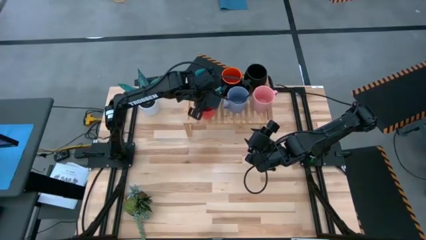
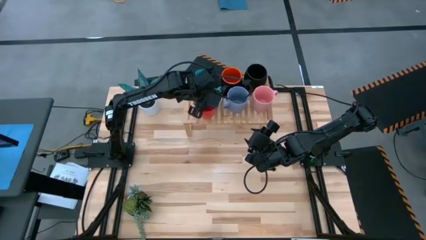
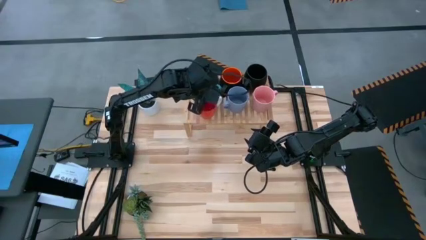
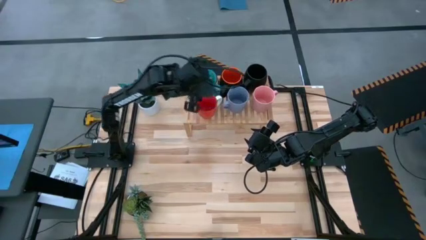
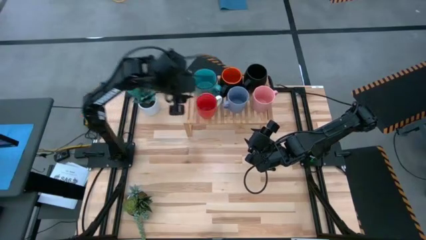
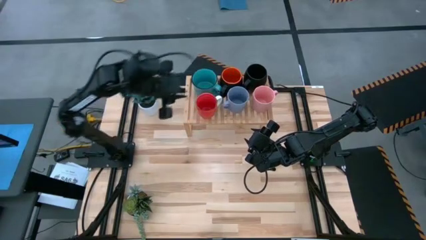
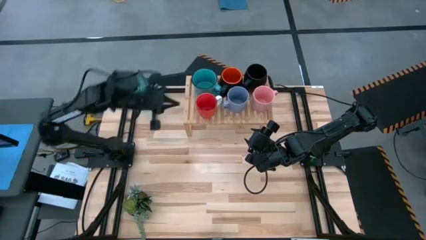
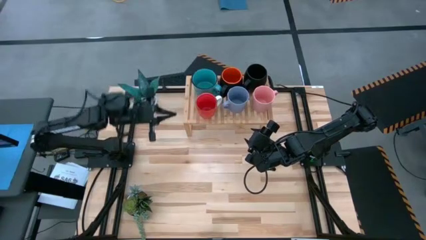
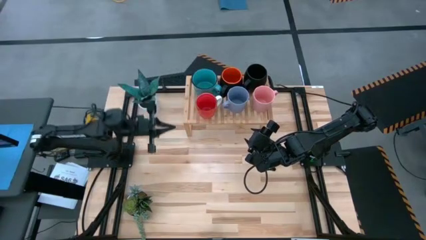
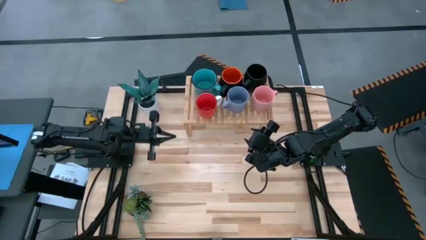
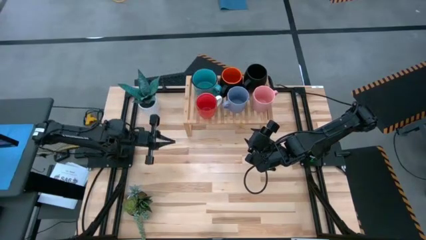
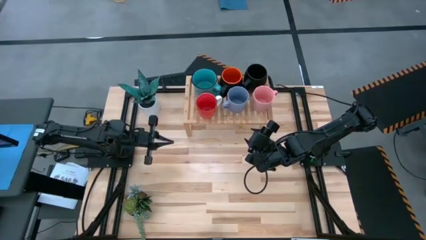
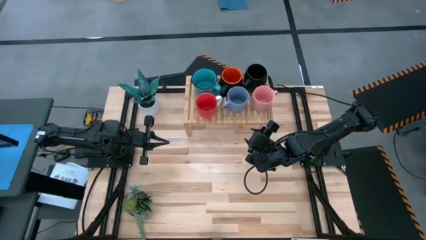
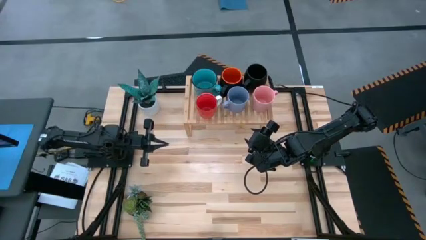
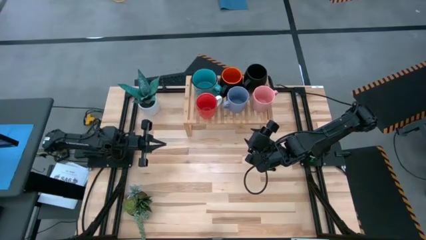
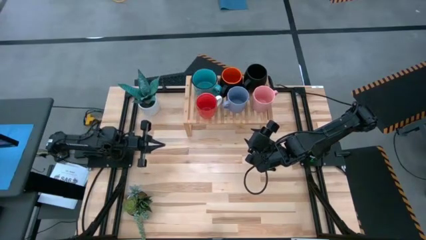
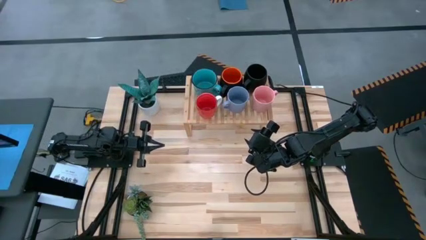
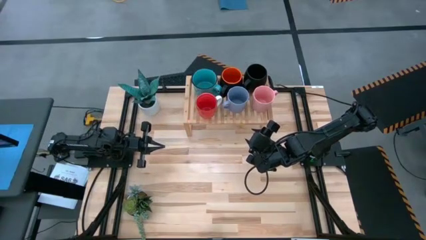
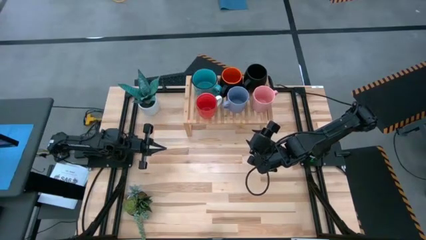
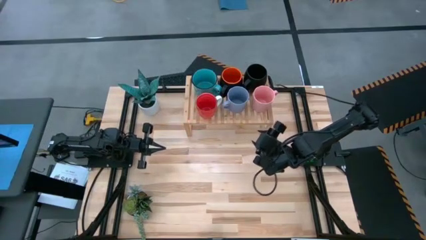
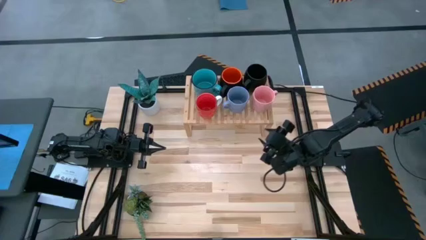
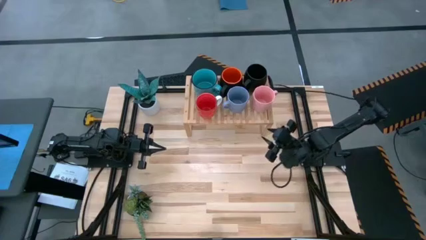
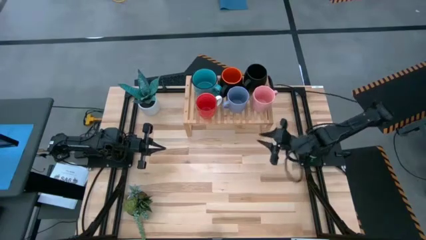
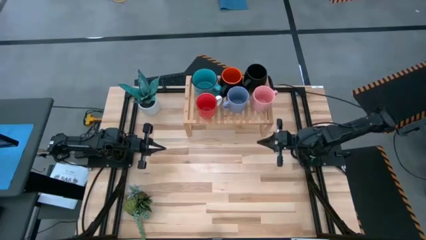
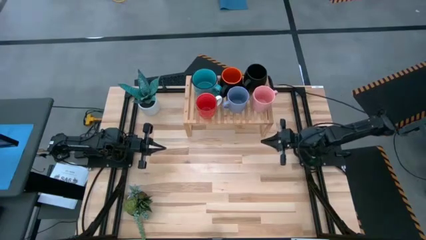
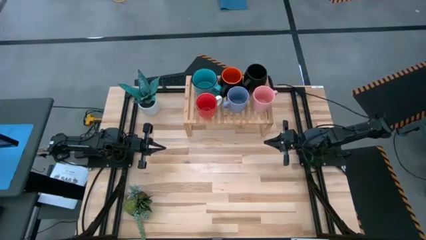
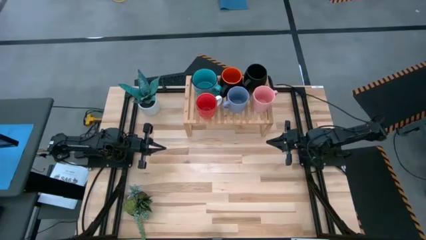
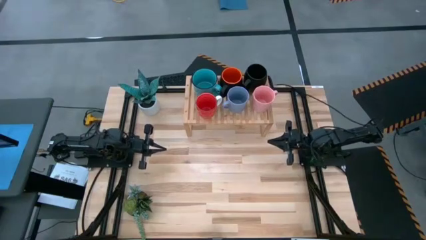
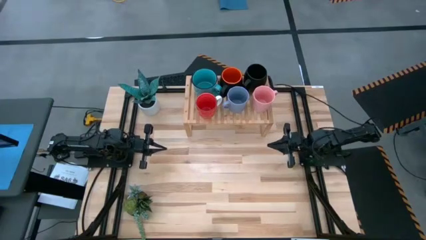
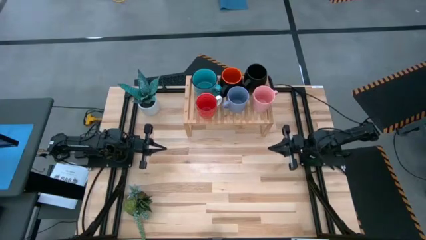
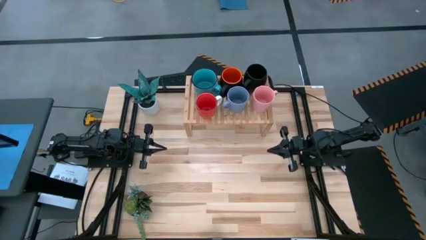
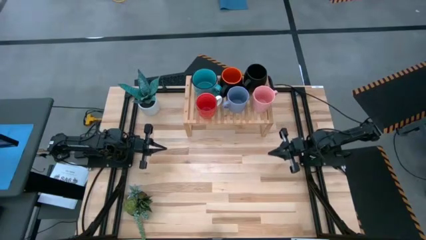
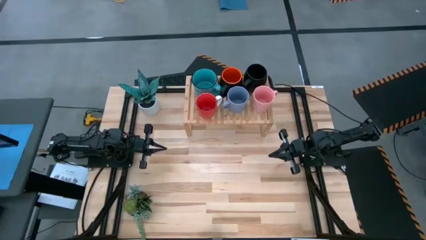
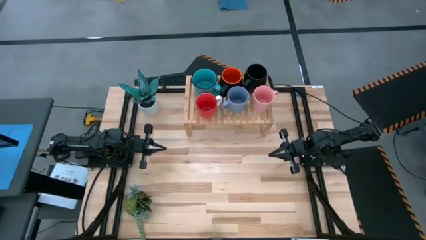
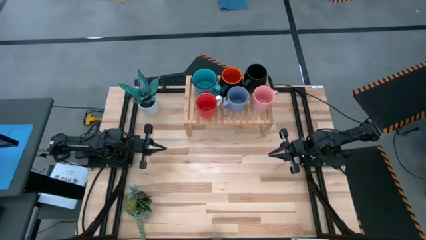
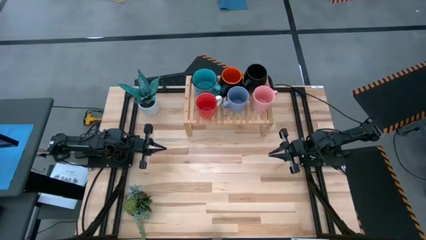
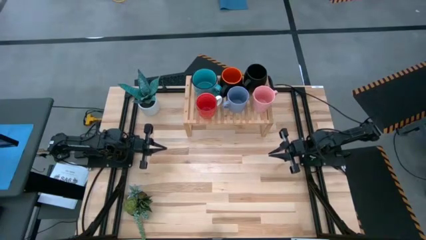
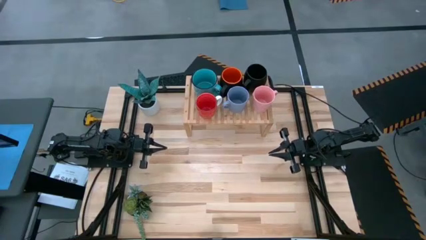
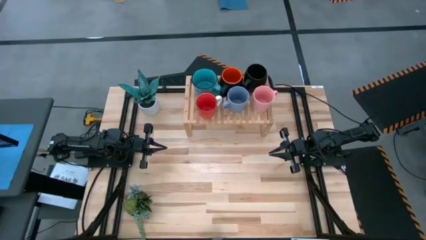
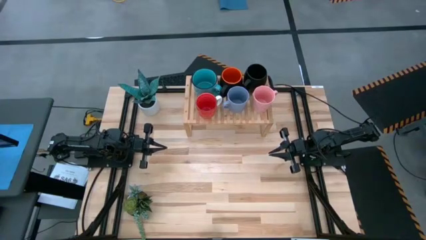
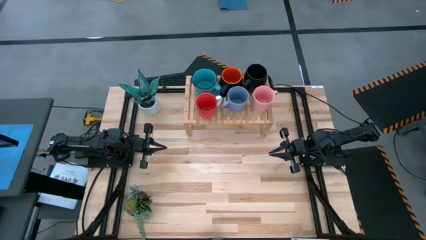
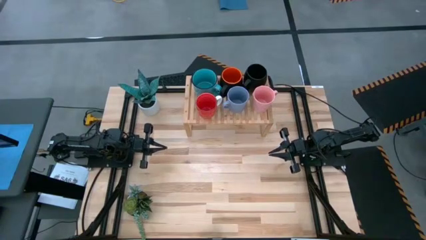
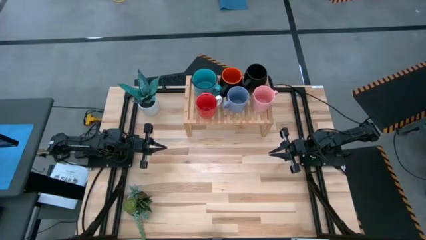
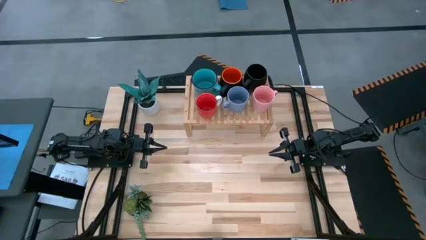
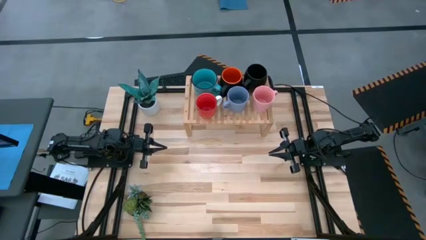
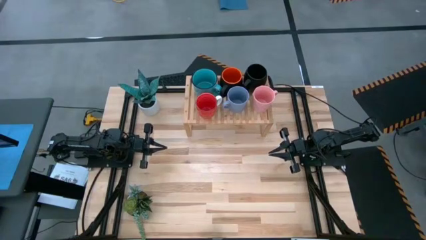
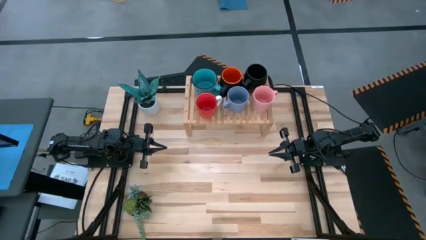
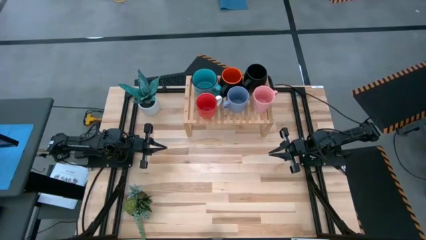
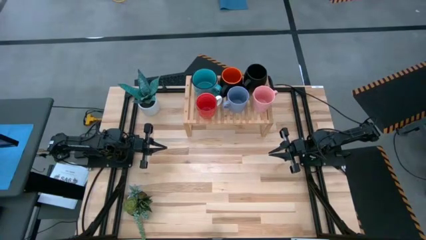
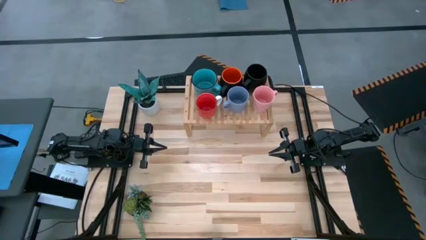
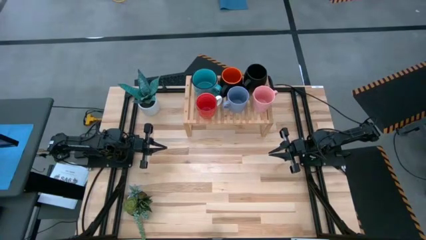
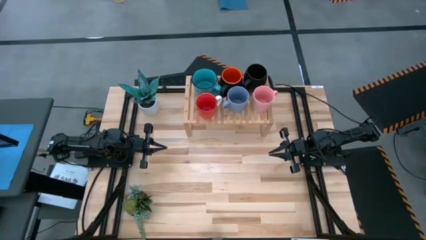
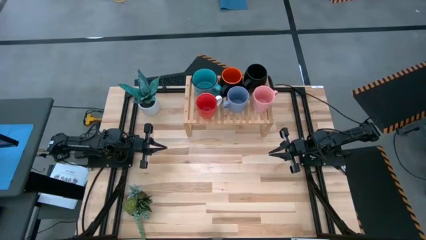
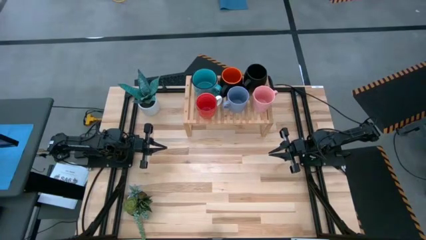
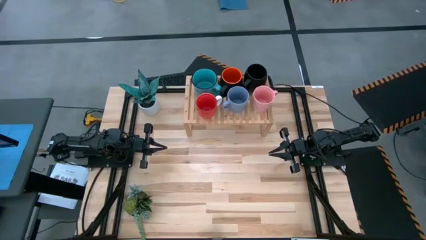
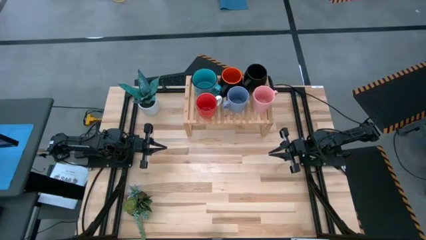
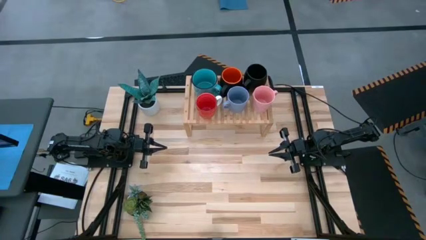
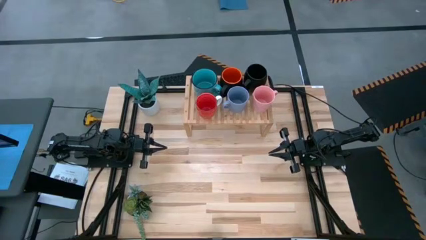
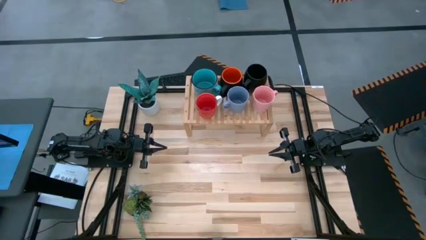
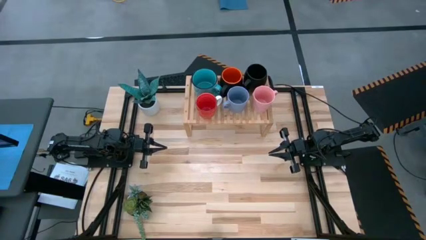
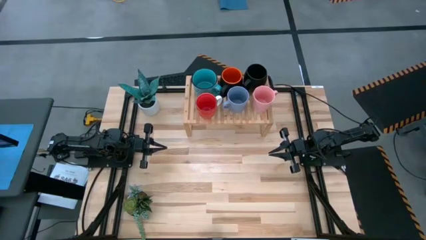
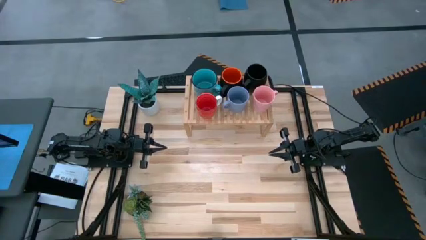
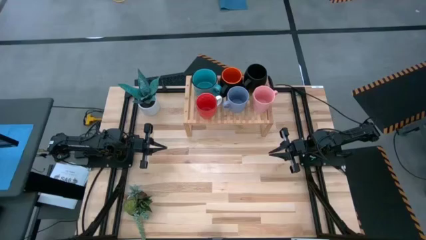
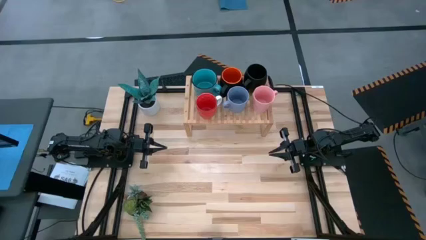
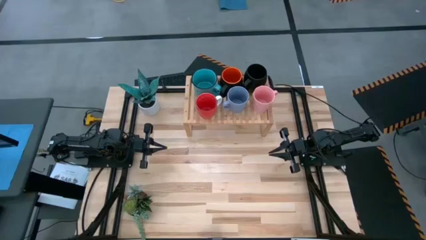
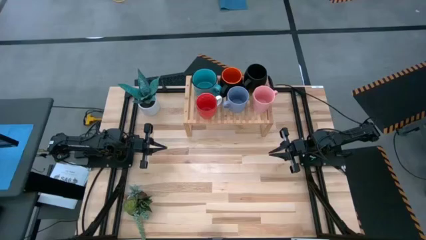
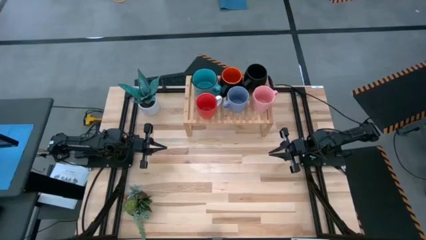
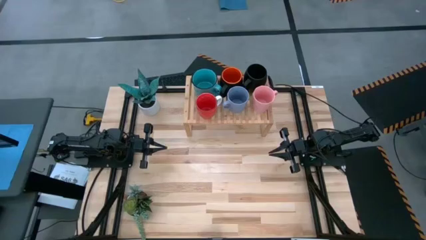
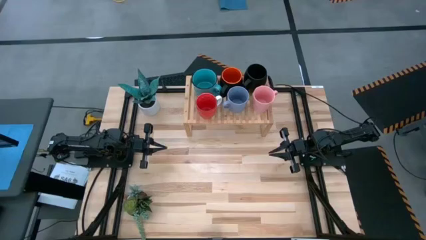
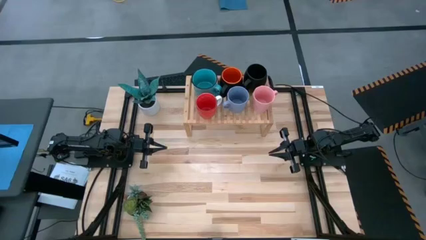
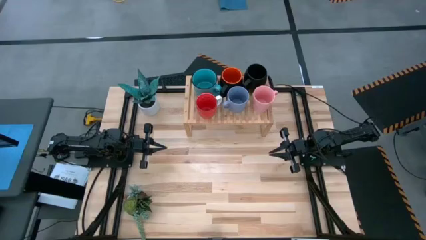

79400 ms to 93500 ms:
Task: Place coffee mugs
Return to Home Position
